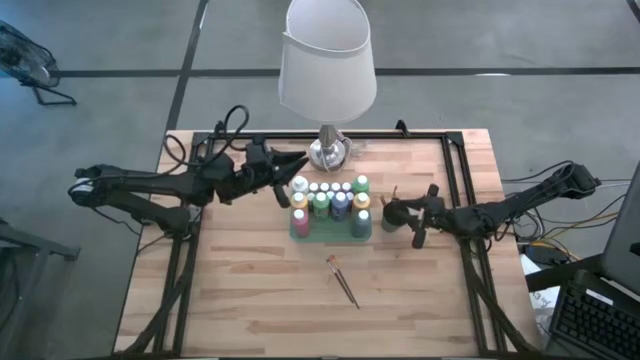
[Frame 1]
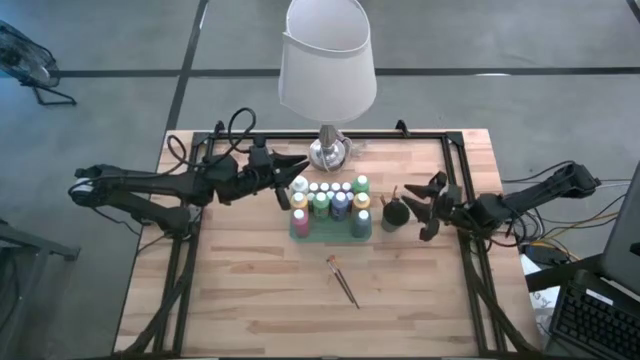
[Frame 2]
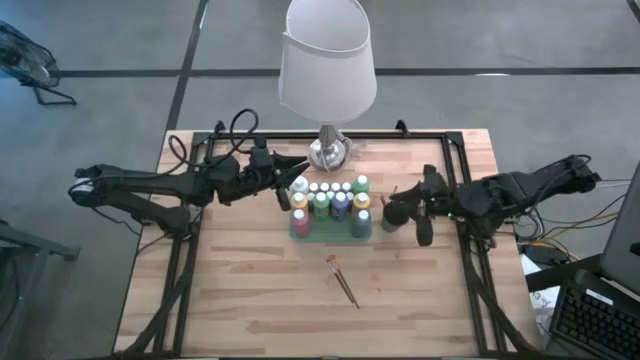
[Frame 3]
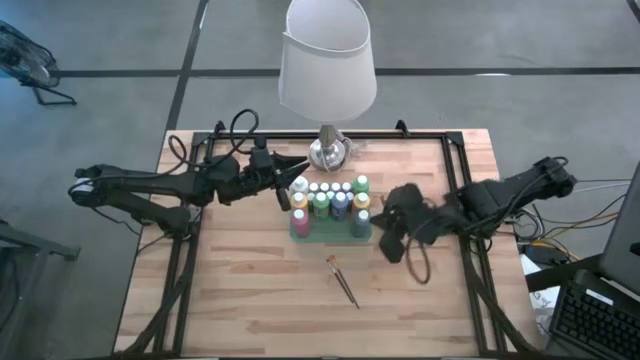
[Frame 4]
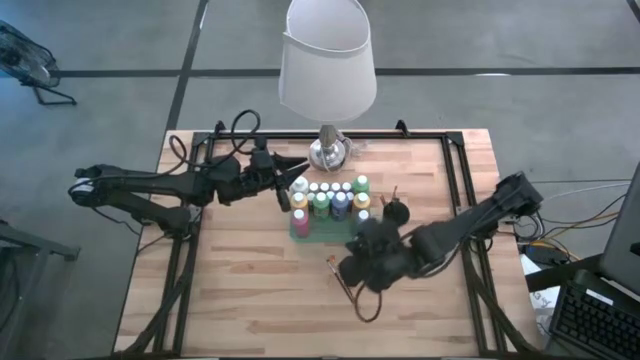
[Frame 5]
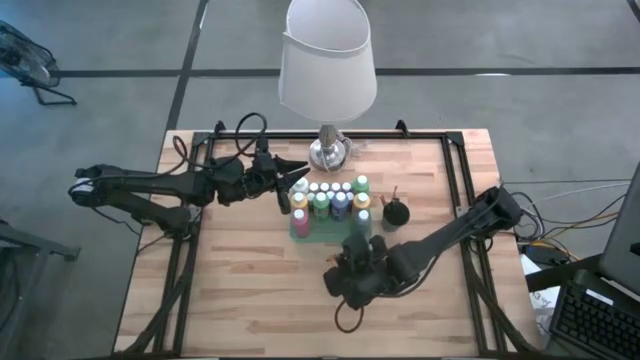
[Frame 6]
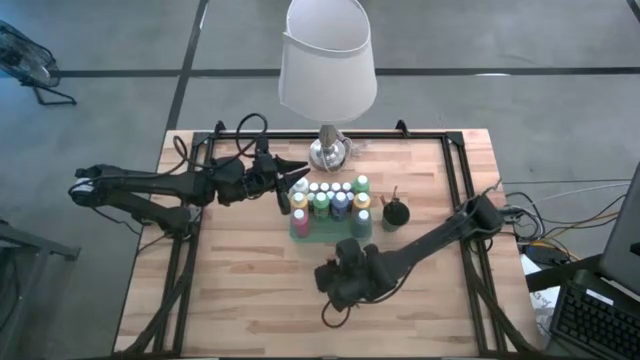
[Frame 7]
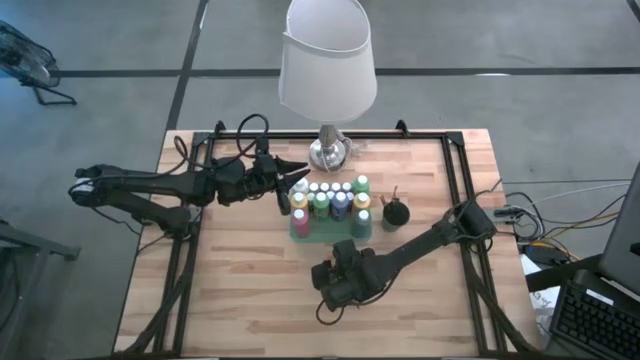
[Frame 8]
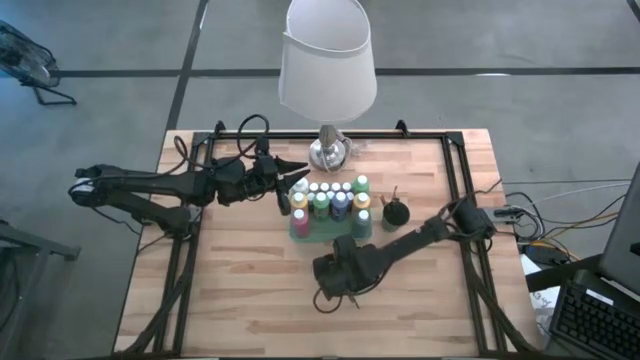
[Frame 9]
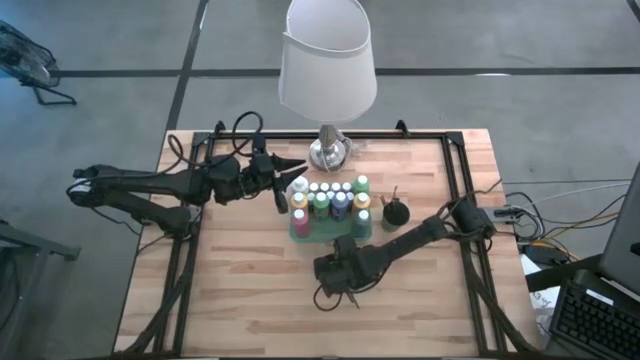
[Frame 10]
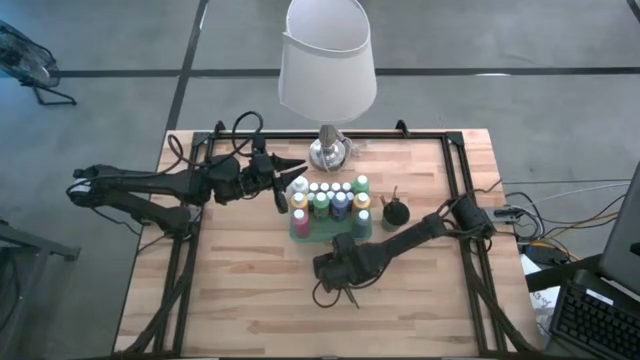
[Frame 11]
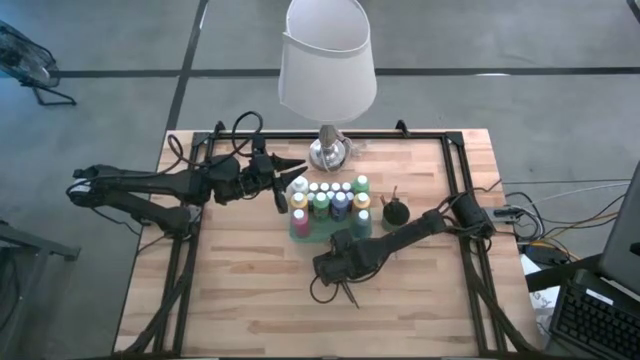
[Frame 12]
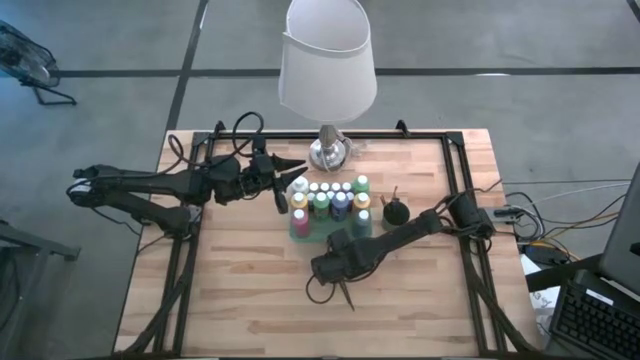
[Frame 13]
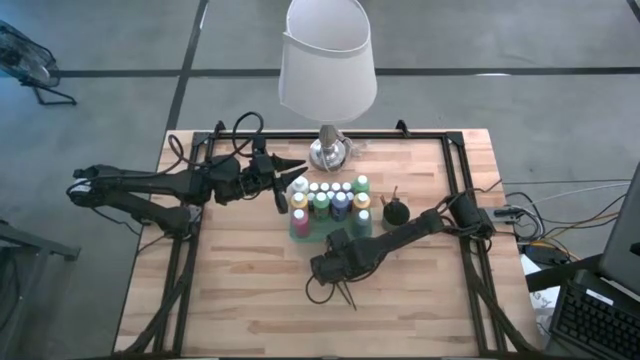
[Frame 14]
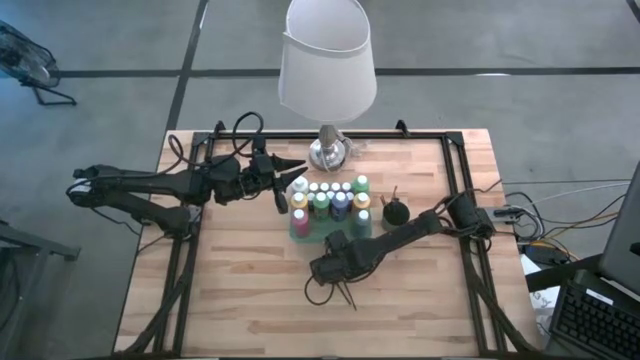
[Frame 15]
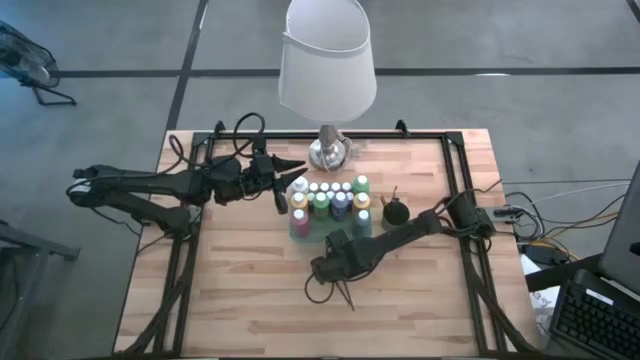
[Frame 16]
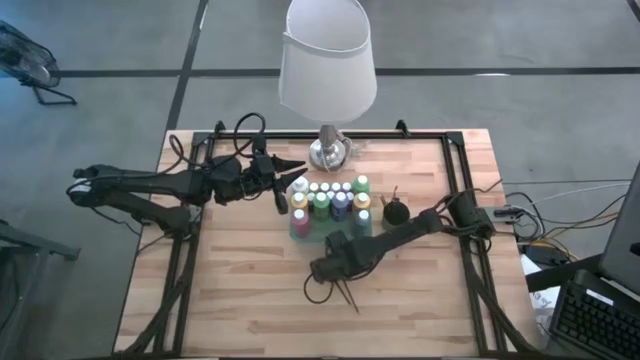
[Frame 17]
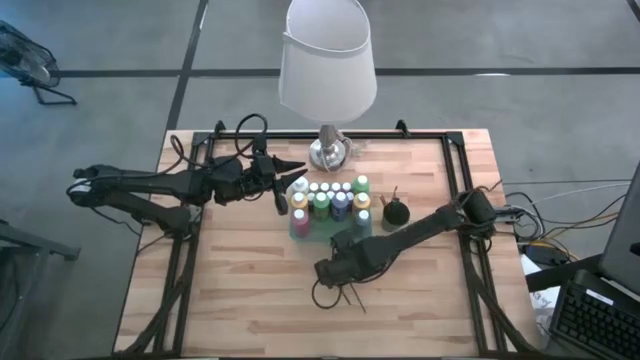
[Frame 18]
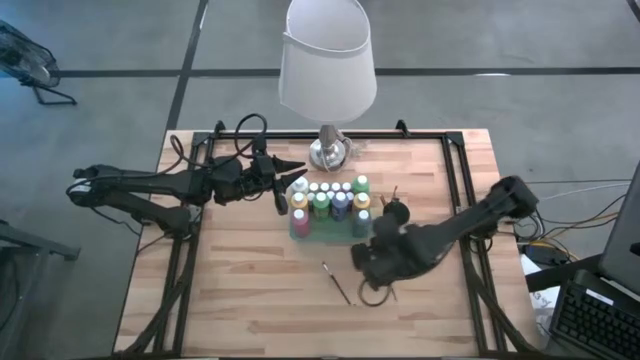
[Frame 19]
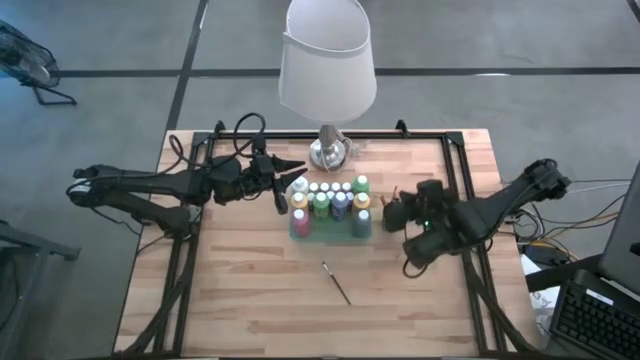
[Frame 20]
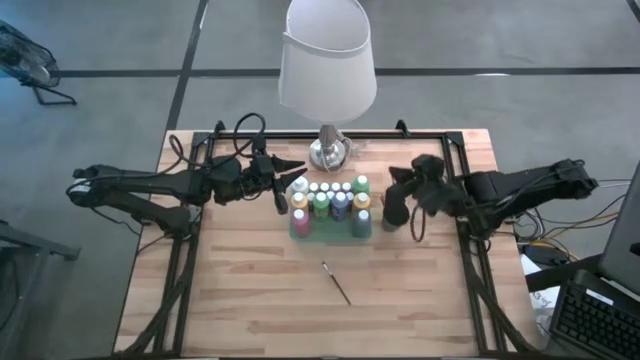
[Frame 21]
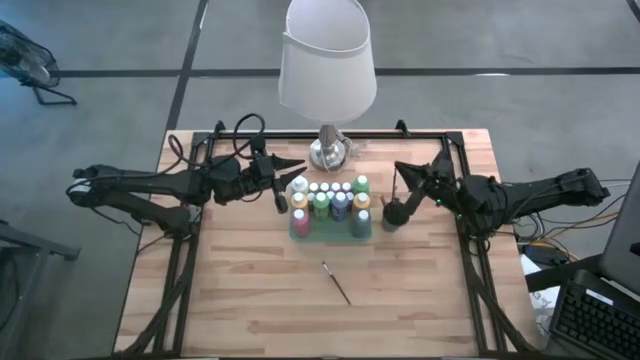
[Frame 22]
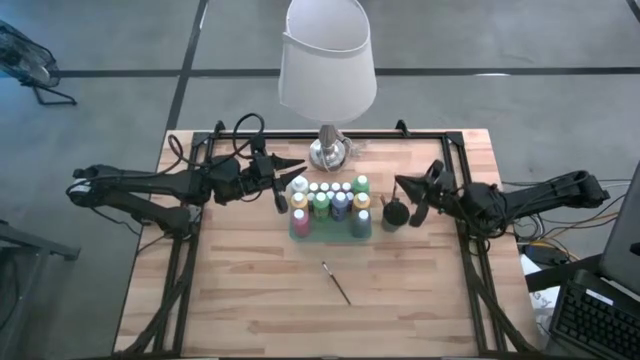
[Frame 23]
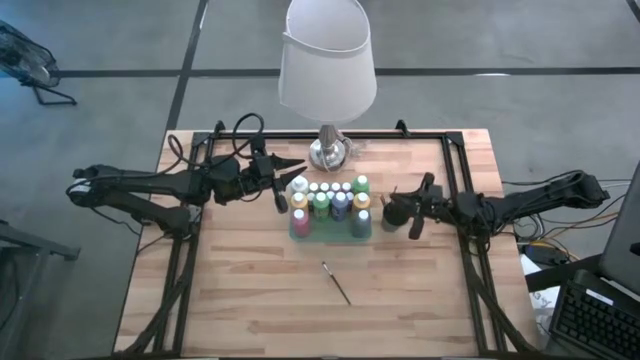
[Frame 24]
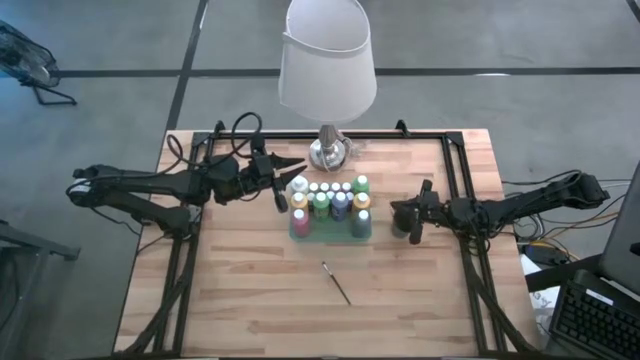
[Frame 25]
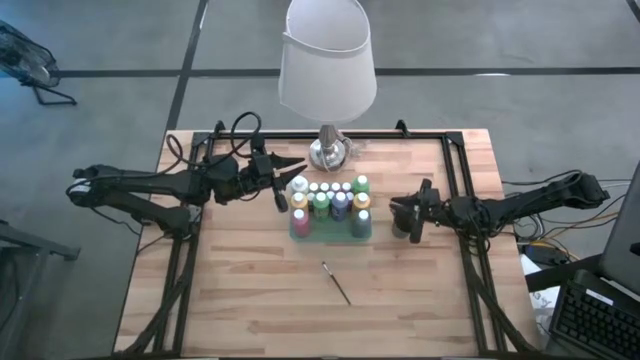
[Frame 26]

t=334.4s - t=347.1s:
Task: Pick & Place Paint Supplies
Put the orange paint brush into the black cup

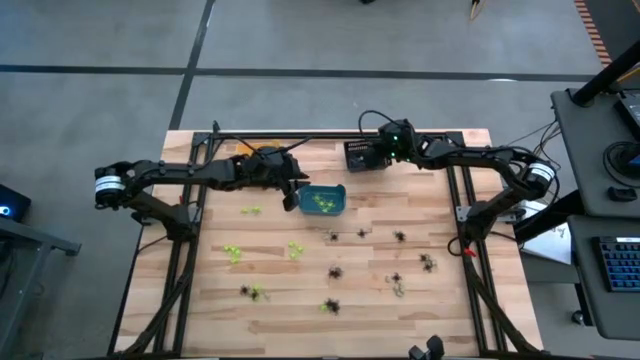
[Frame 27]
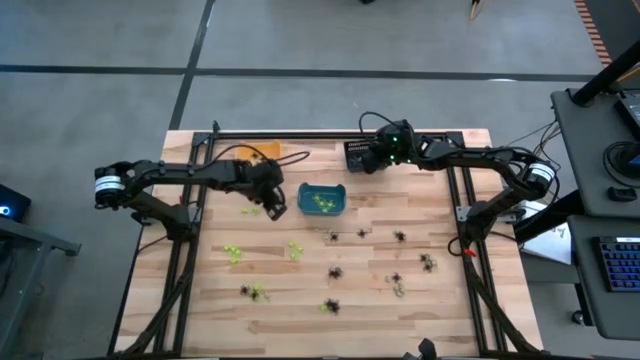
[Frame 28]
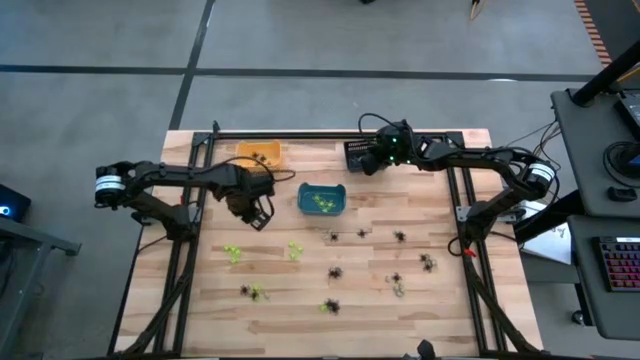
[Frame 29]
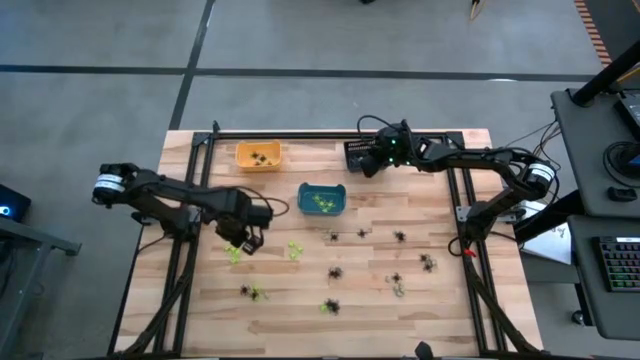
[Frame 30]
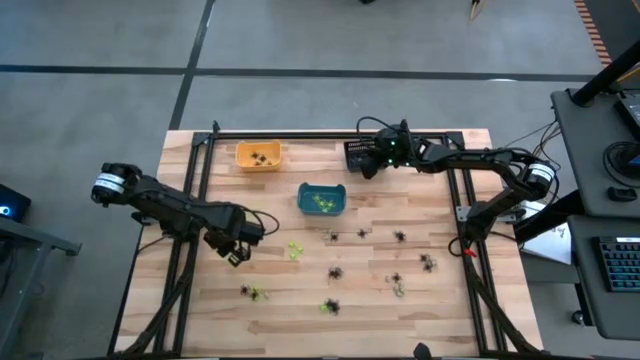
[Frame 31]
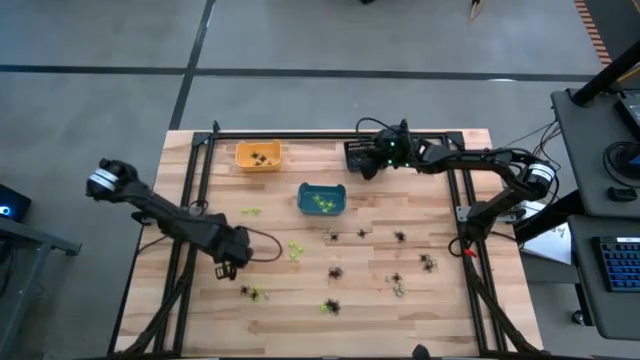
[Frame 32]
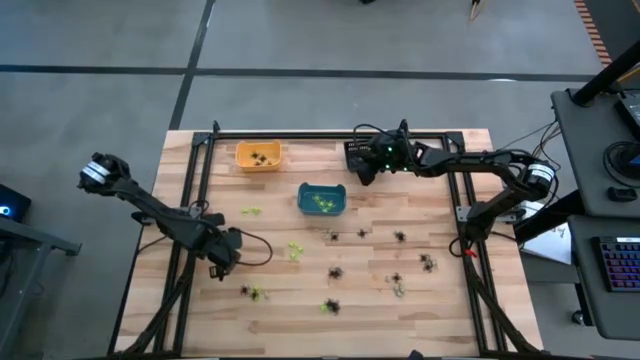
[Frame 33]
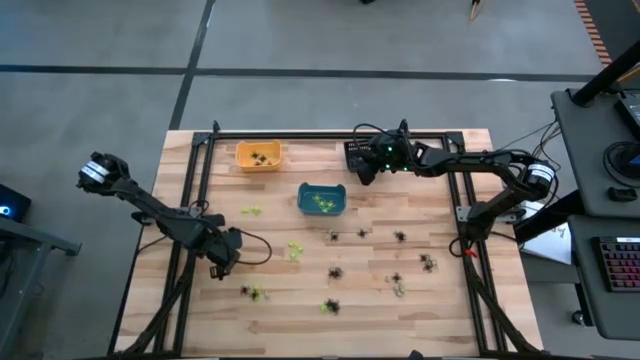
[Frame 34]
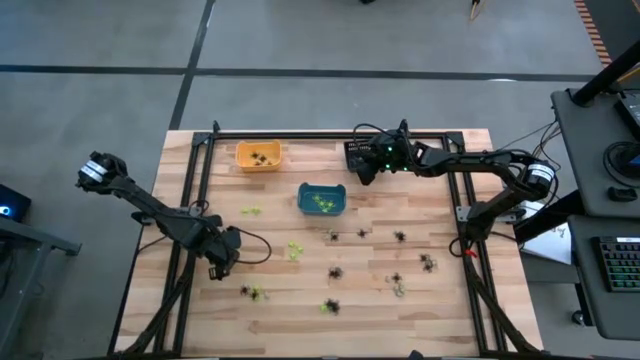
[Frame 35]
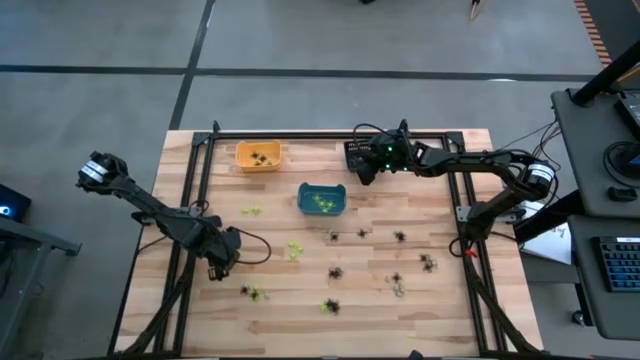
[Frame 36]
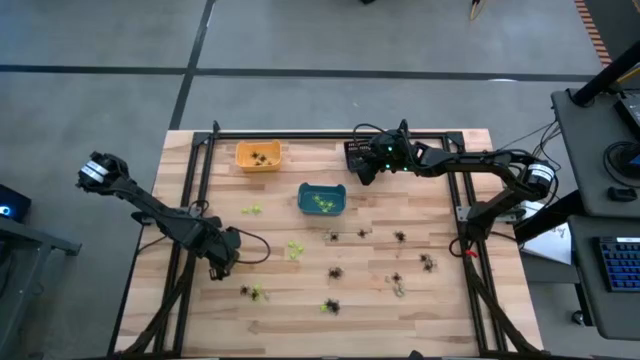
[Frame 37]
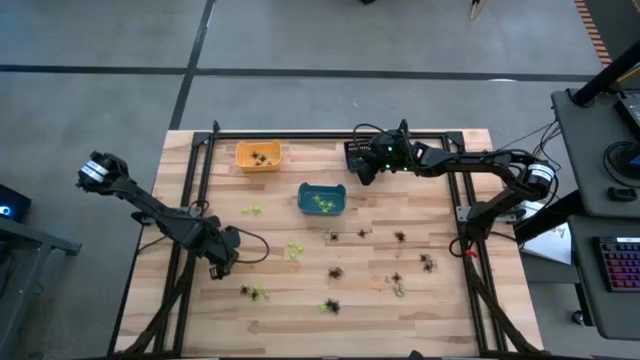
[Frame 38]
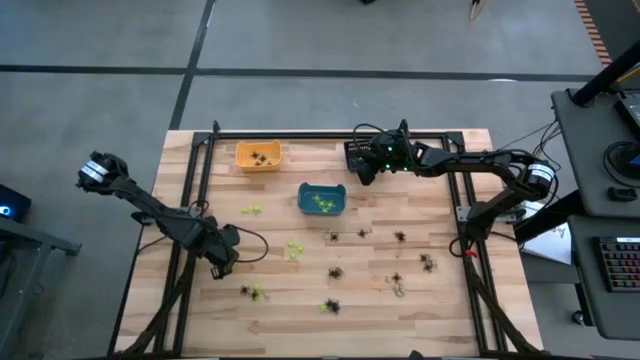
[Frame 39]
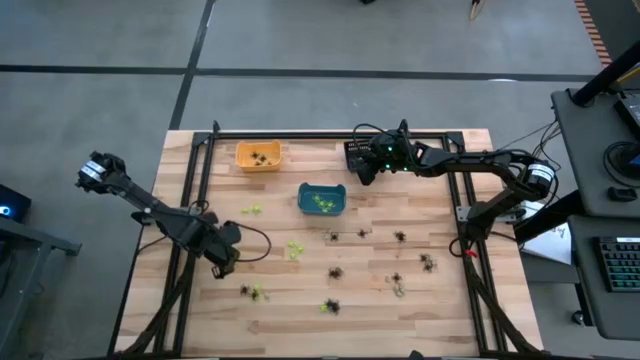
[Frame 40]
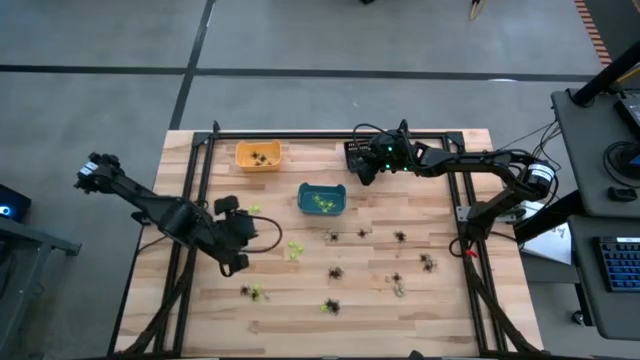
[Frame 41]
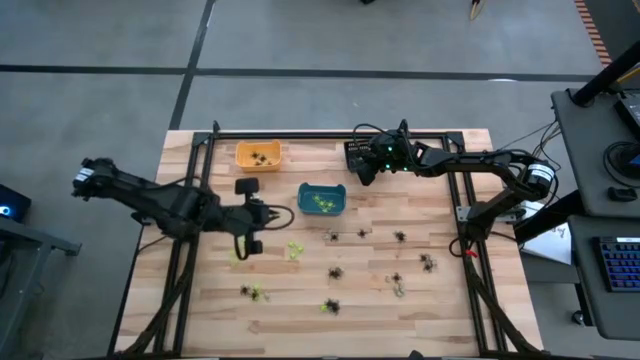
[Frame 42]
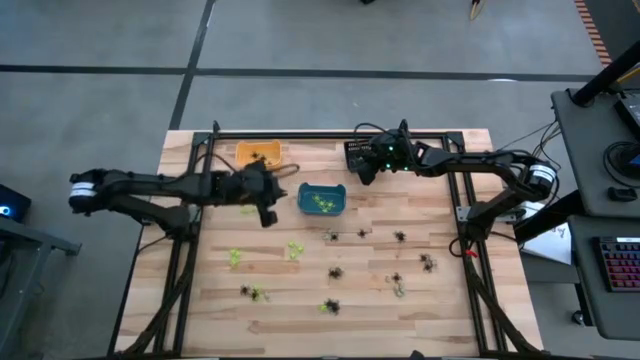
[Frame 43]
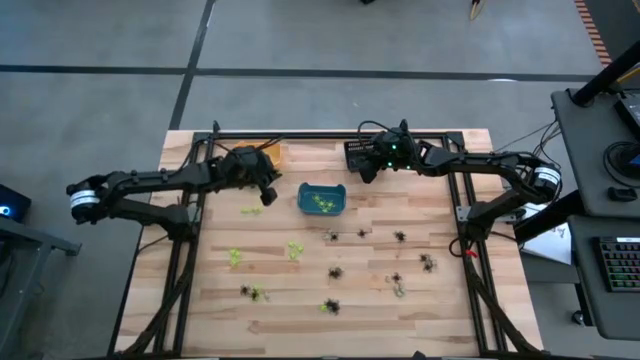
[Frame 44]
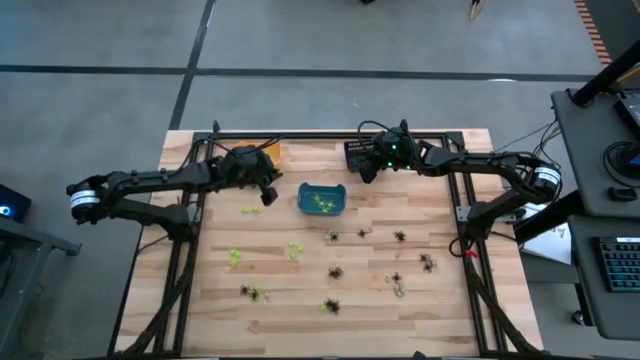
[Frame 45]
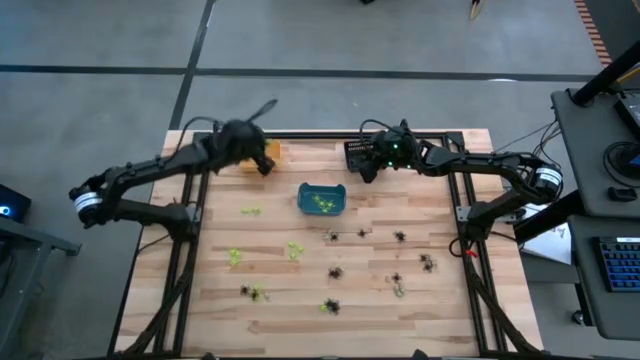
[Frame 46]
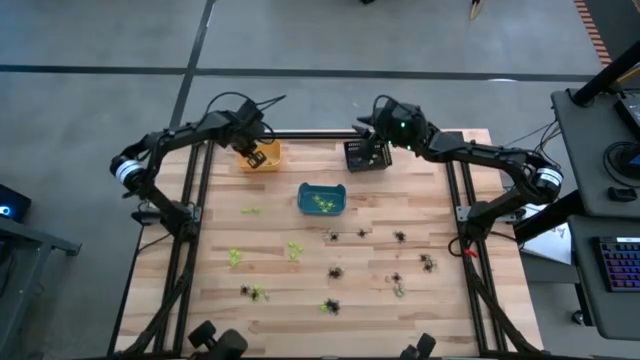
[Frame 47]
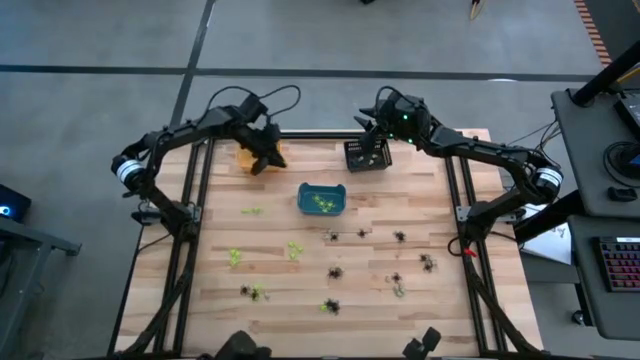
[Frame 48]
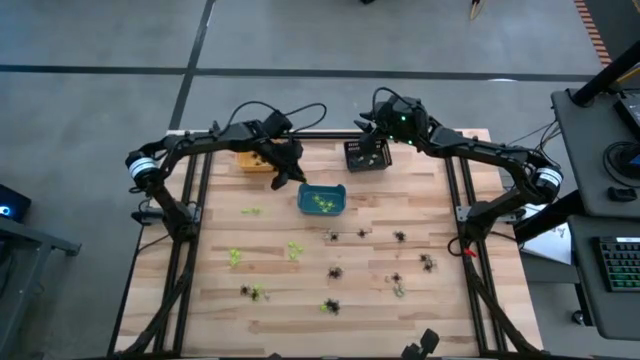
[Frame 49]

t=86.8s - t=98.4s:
Task: Sort Halloween decoration
Put the green spider toy into the blue bin
